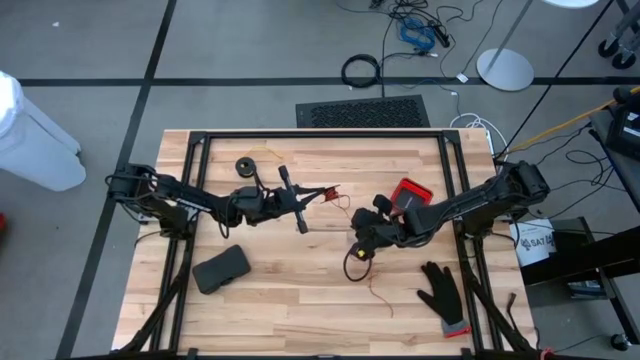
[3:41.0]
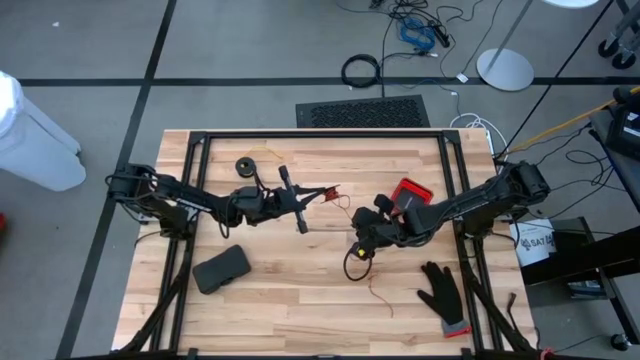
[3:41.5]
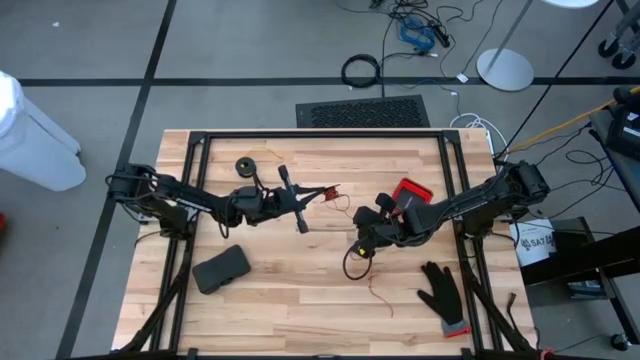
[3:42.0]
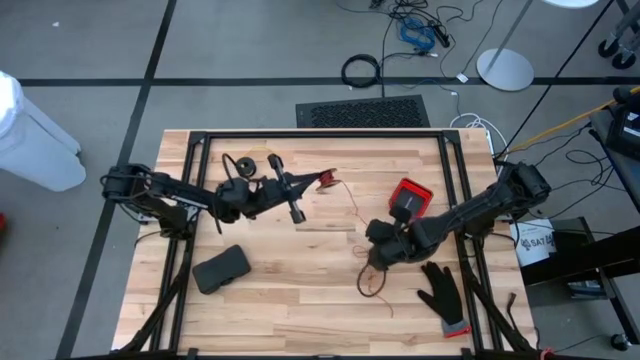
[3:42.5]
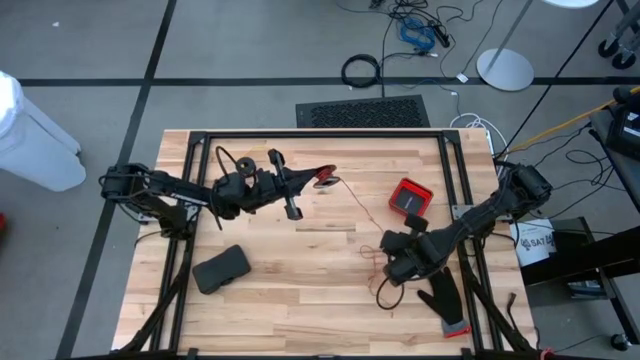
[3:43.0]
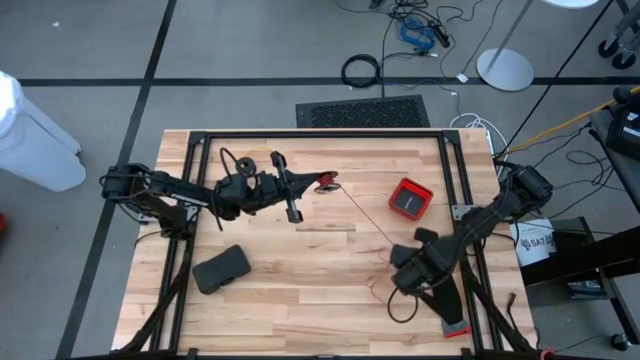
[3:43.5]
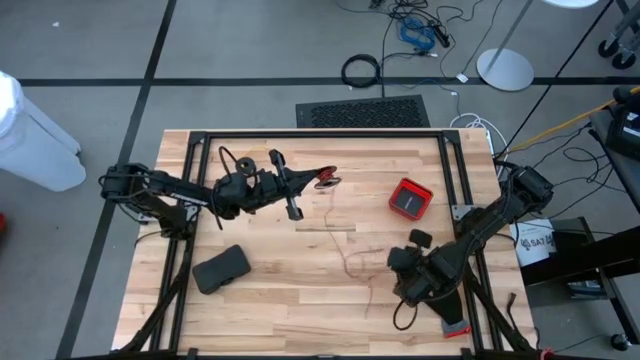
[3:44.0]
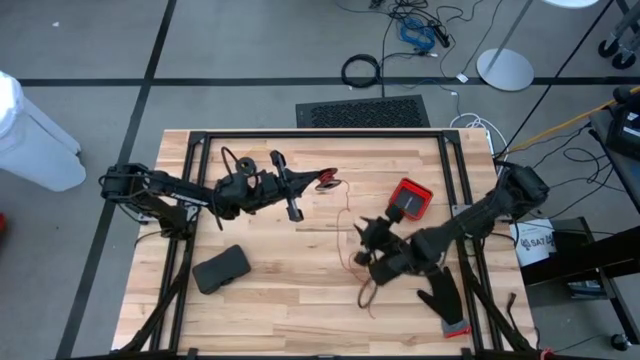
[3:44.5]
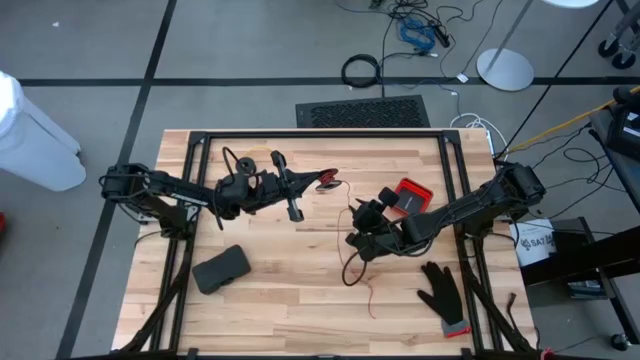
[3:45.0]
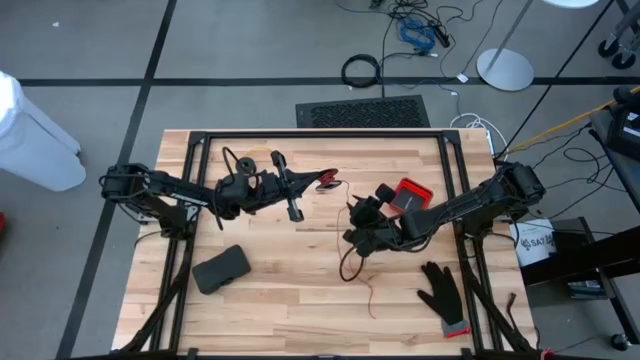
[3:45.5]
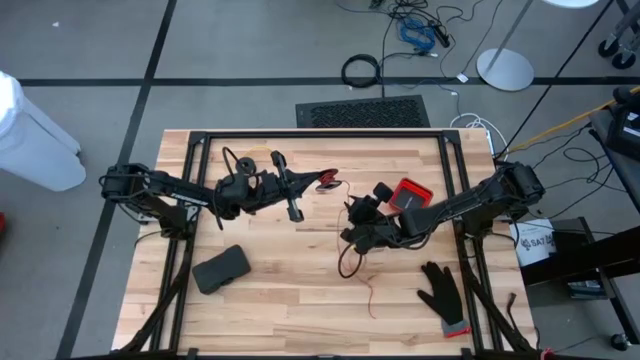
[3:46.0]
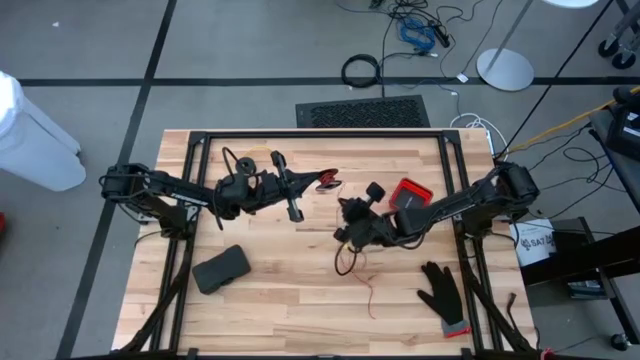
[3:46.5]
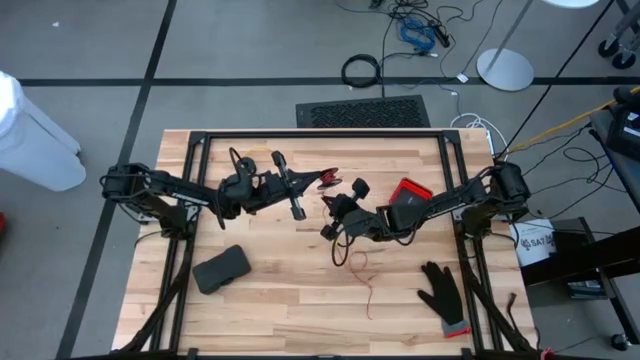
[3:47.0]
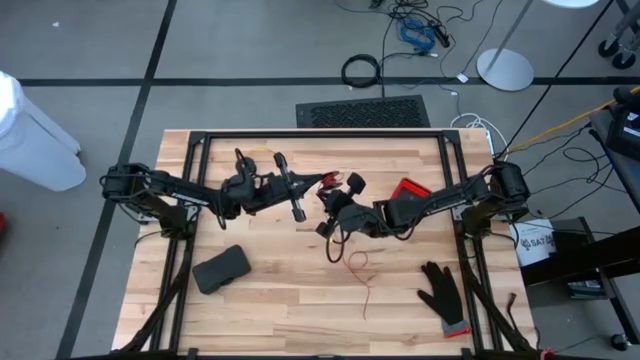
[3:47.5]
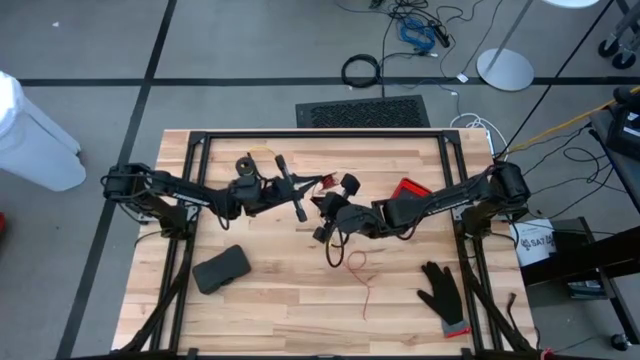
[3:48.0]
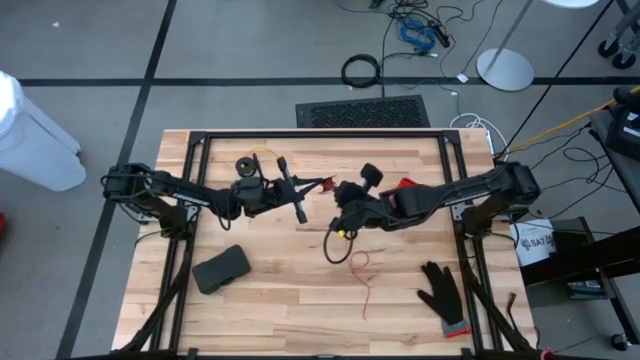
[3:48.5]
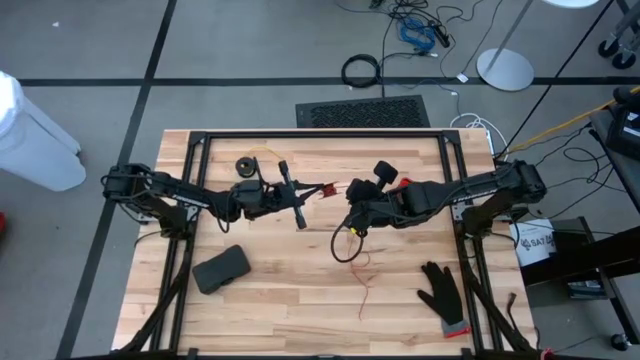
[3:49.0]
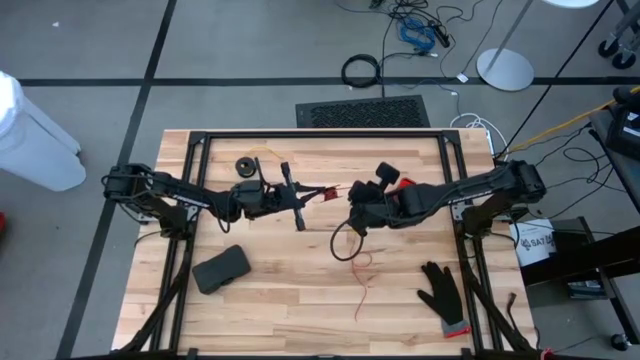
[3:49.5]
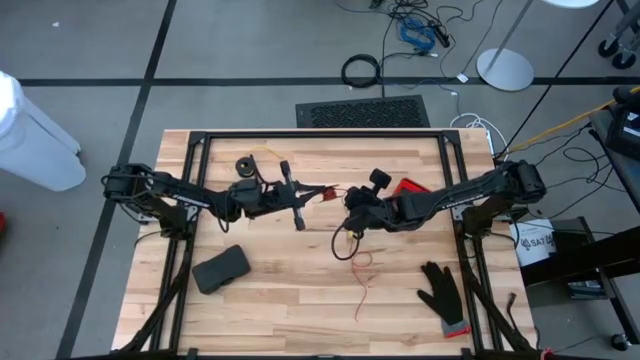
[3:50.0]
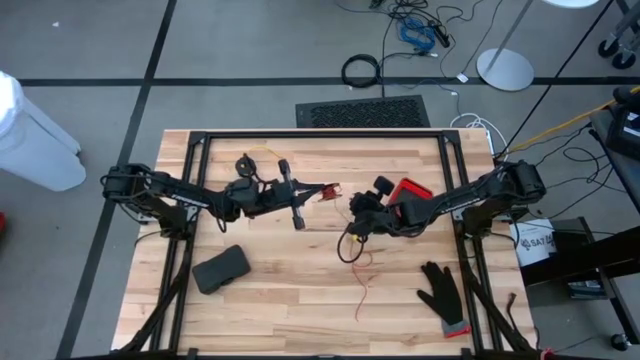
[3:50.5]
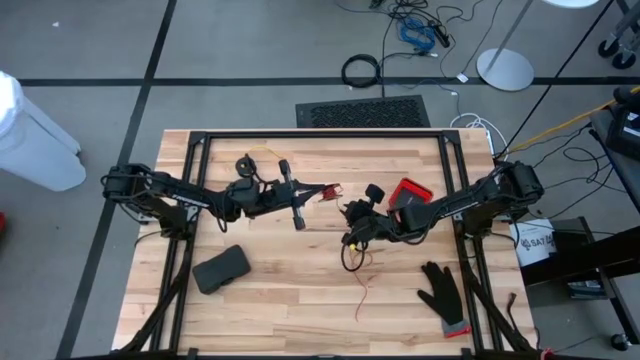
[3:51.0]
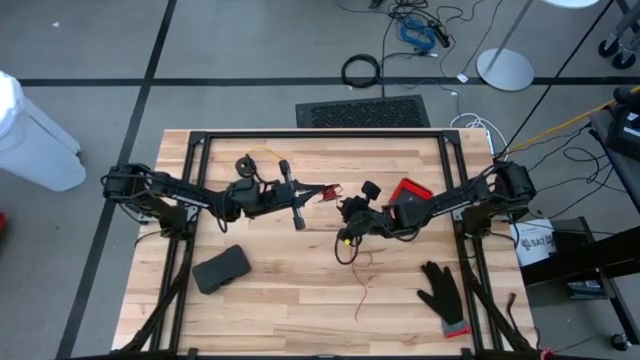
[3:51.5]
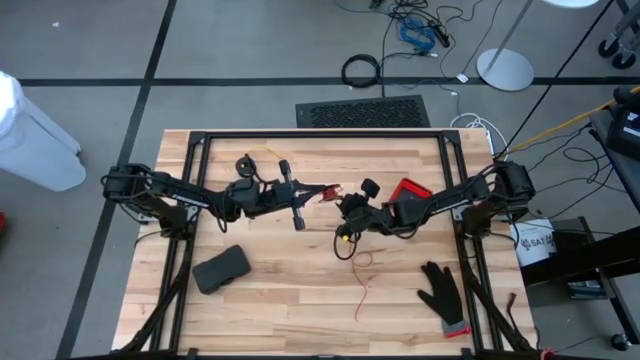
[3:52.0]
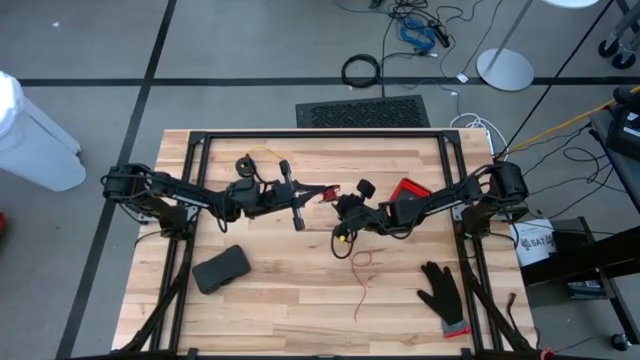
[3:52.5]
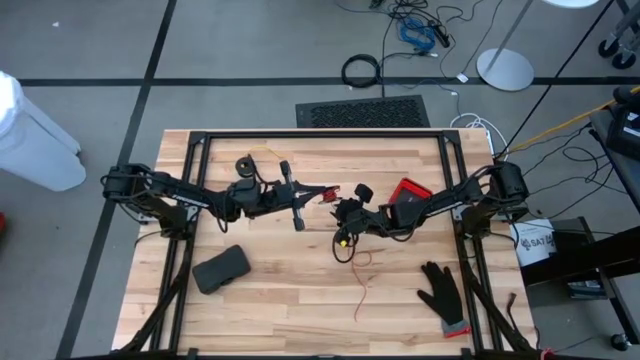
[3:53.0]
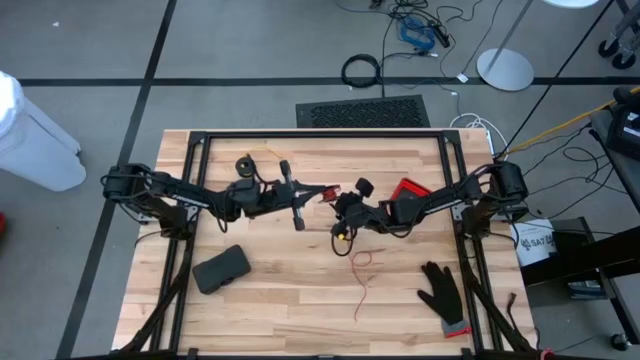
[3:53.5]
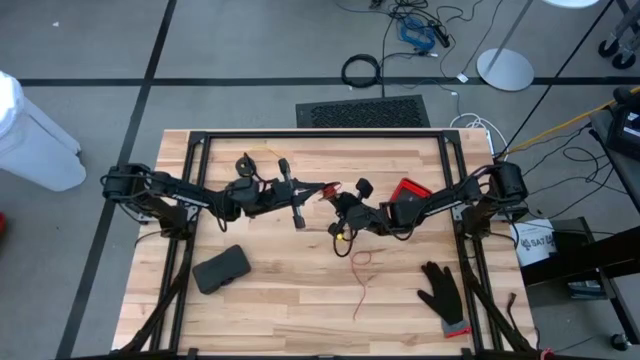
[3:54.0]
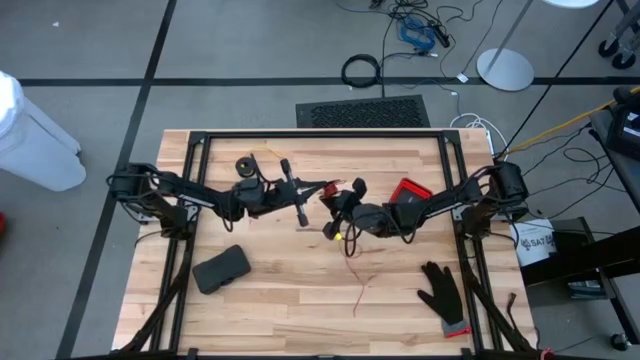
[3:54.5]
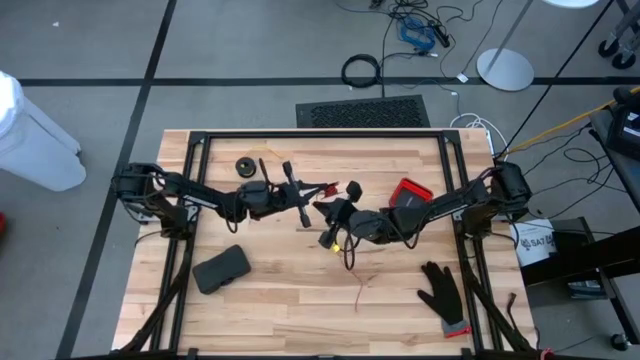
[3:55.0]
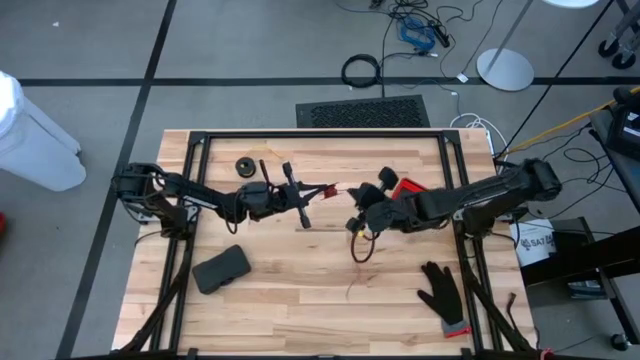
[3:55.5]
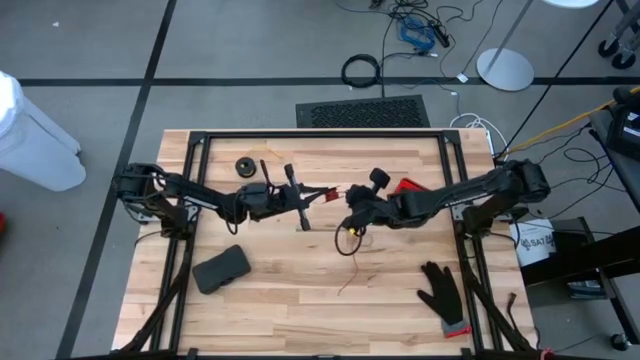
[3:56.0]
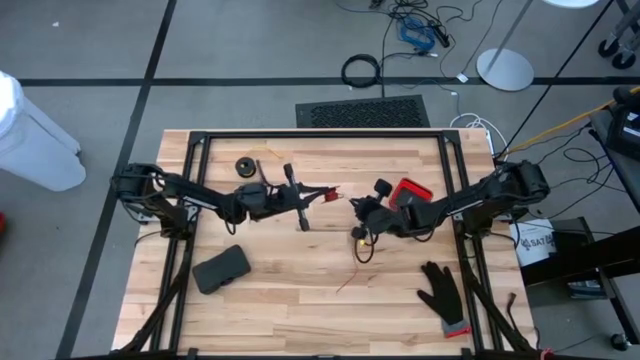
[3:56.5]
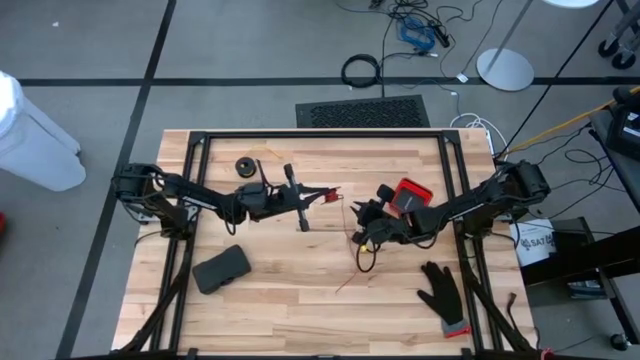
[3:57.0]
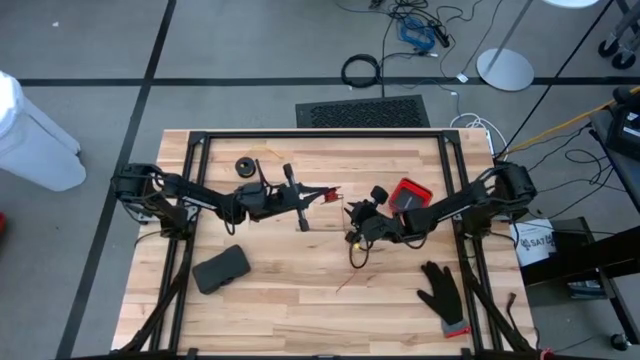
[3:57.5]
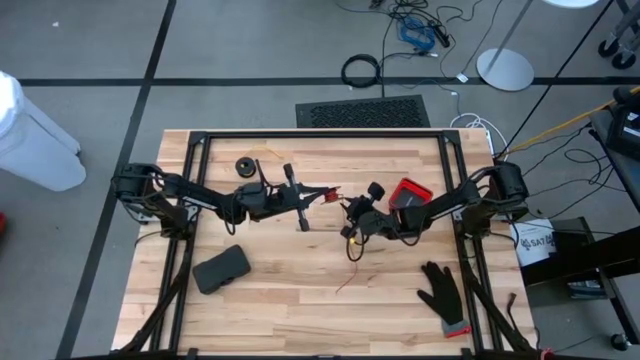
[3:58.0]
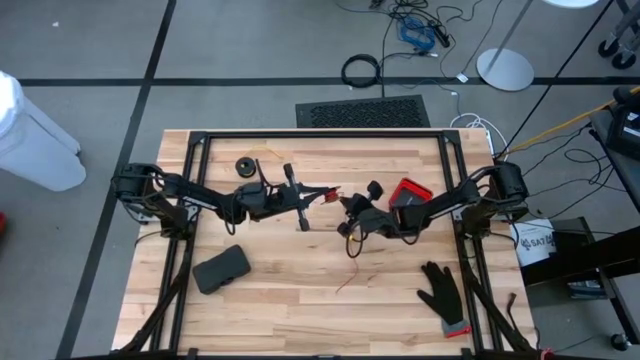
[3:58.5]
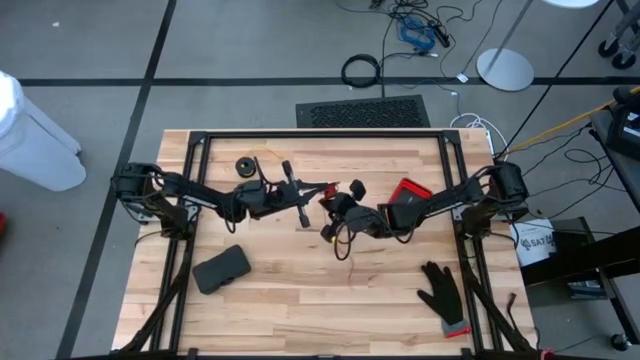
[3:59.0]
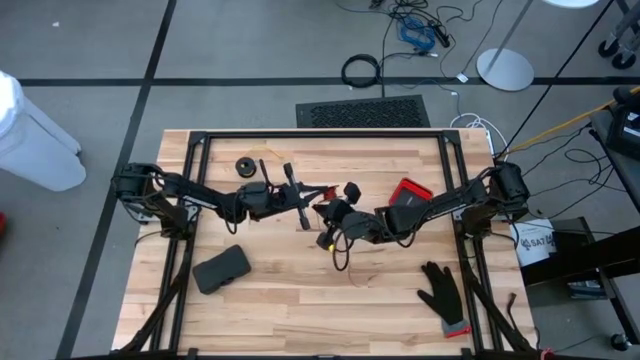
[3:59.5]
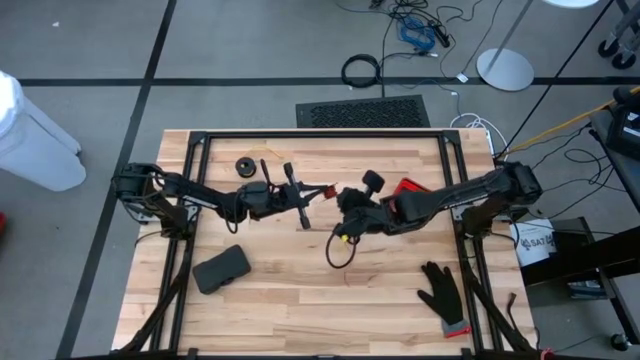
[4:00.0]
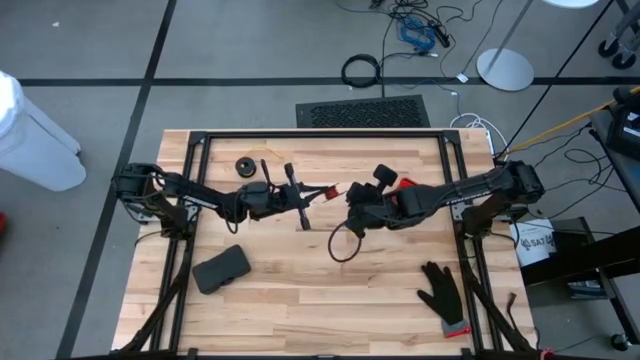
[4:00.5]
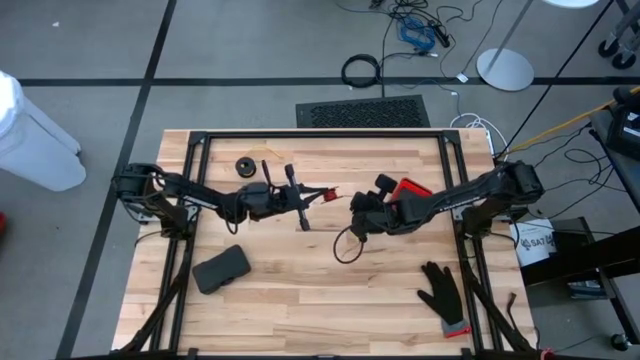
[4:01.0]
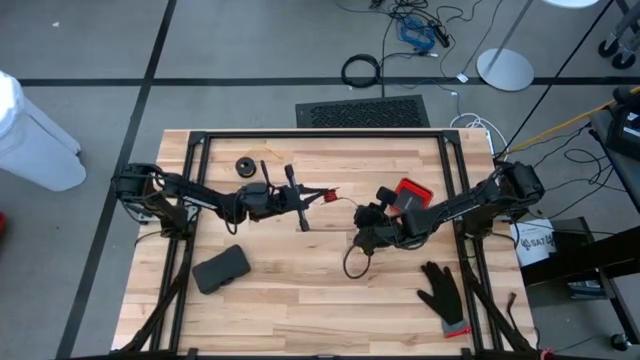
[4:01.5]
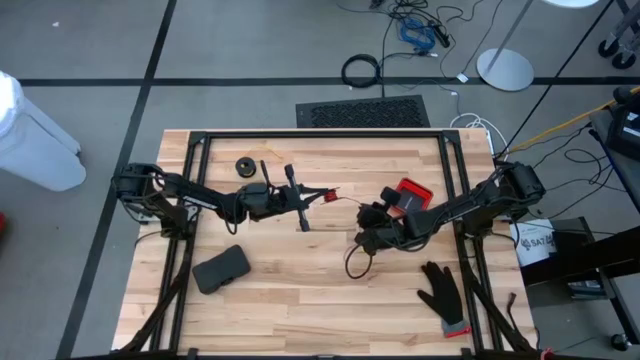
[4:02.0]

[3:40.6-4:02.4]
Task: Coil cords
Coil the red wire onto the black spool

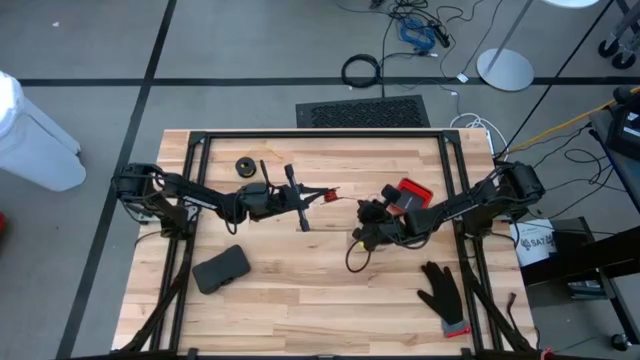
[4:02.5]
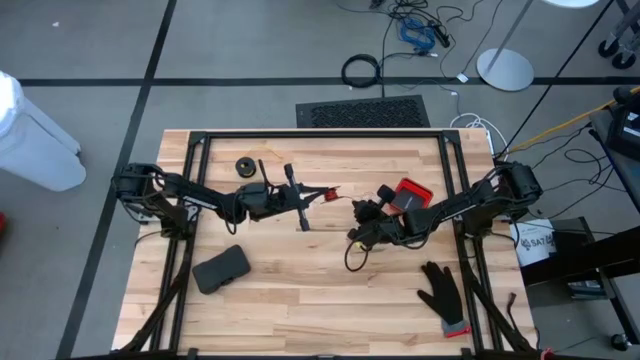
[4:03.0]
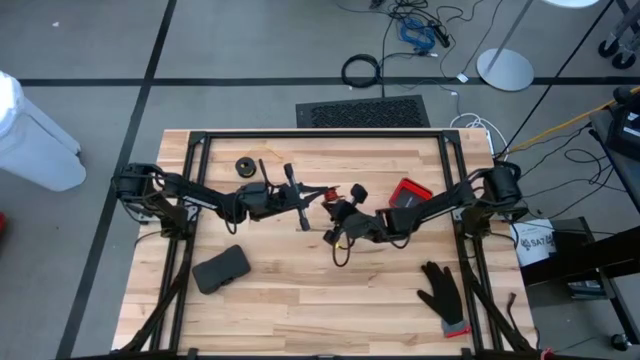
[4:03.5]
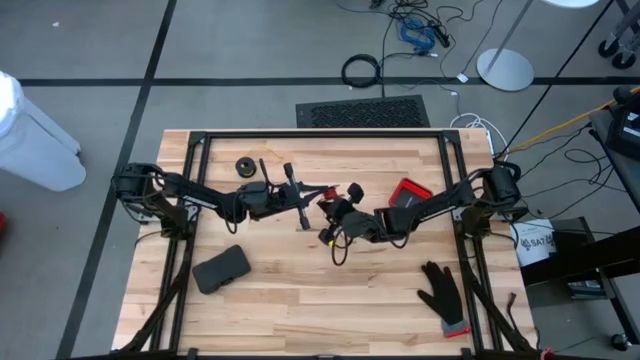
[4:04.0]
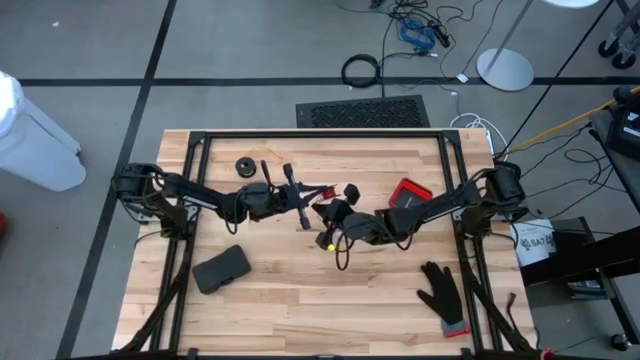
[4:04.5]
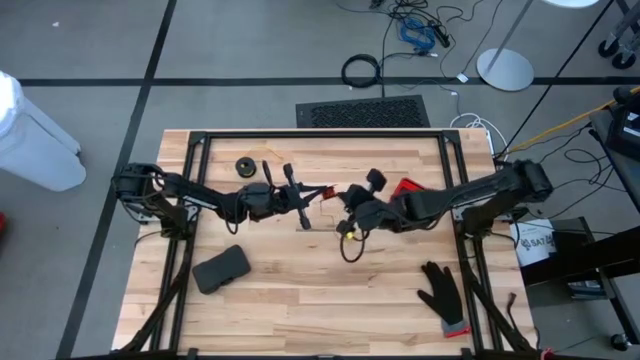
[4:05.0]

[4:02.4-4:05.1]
Coil the red wire onto the black spool
